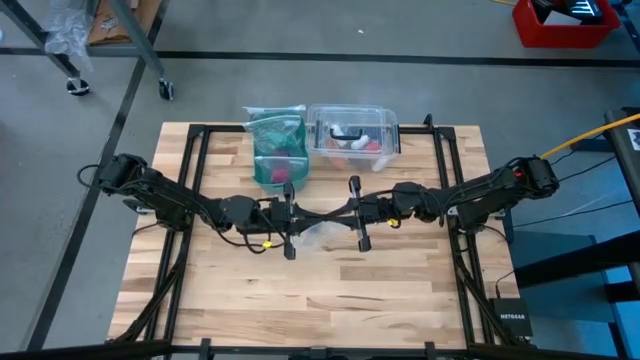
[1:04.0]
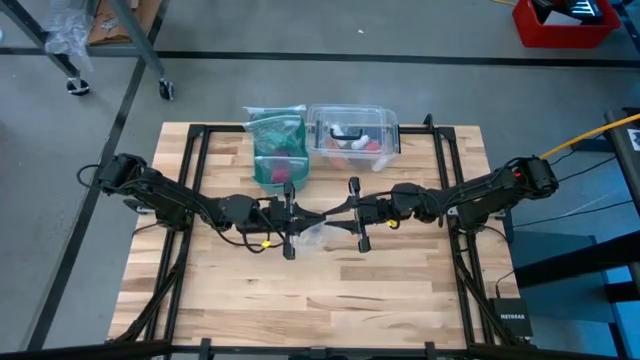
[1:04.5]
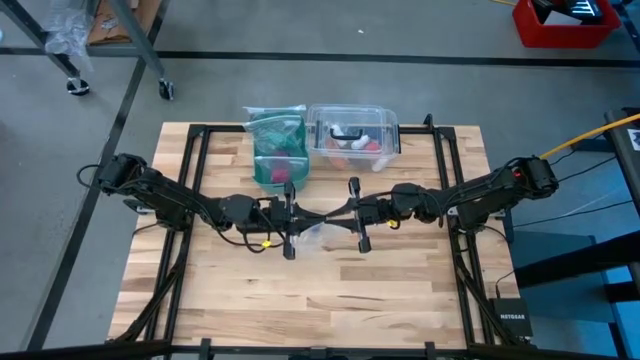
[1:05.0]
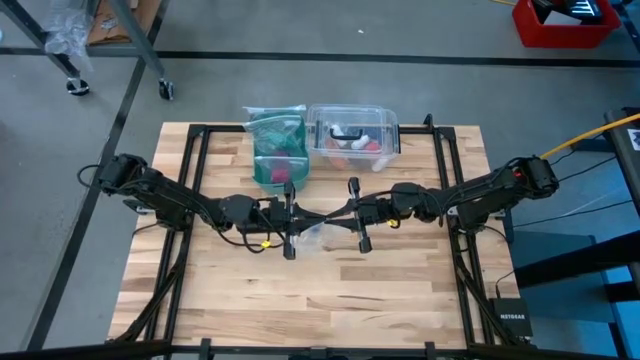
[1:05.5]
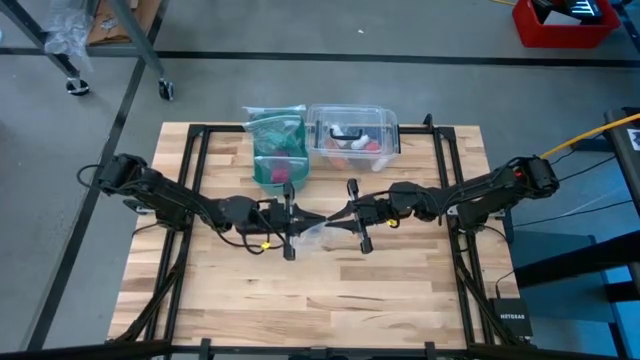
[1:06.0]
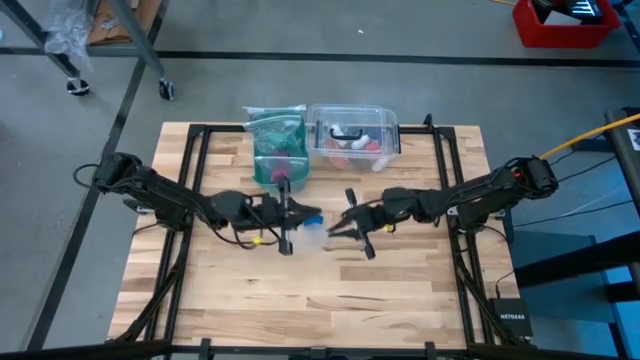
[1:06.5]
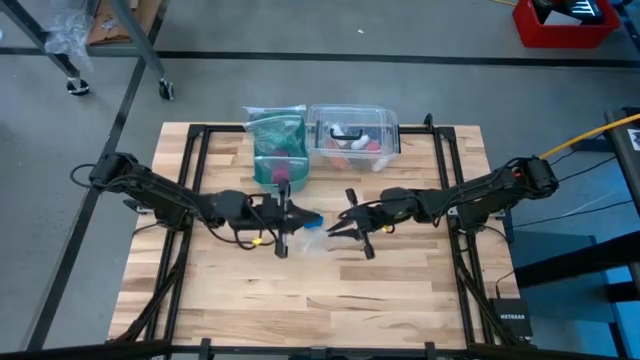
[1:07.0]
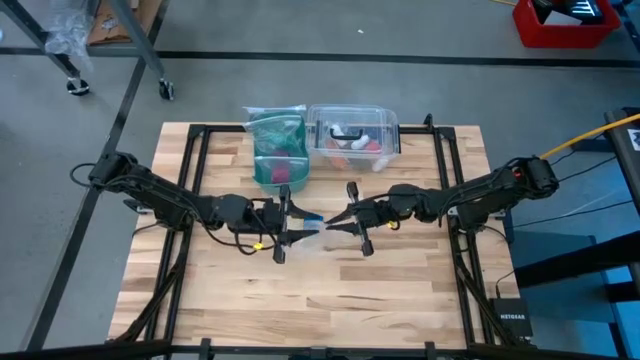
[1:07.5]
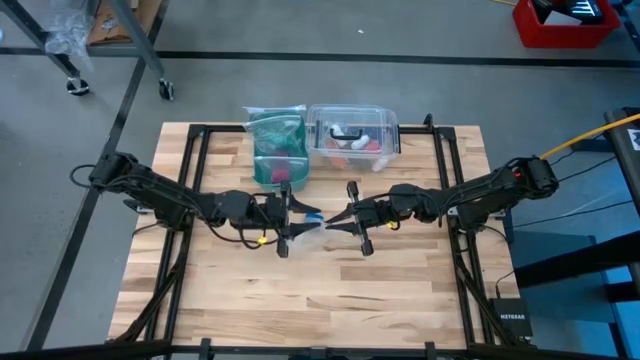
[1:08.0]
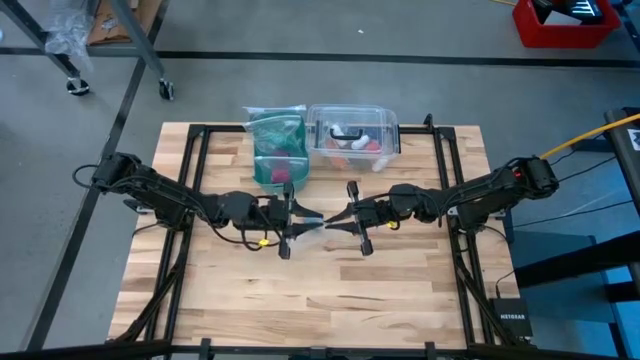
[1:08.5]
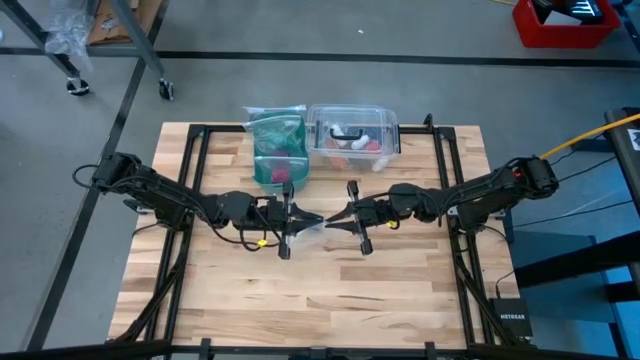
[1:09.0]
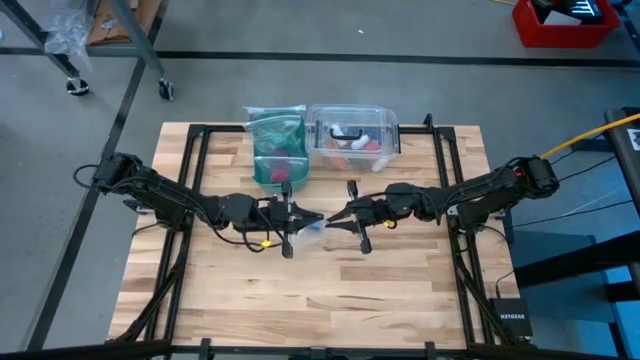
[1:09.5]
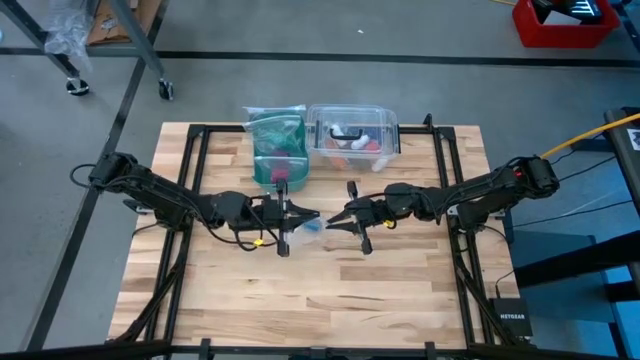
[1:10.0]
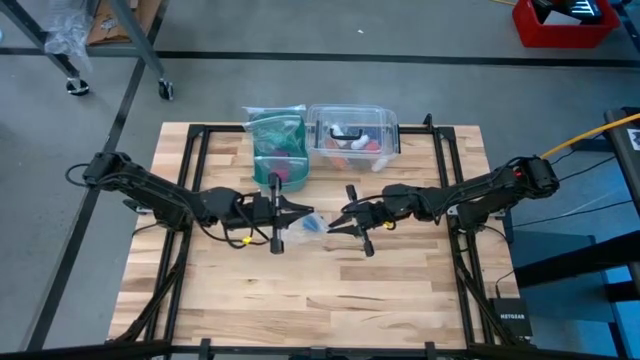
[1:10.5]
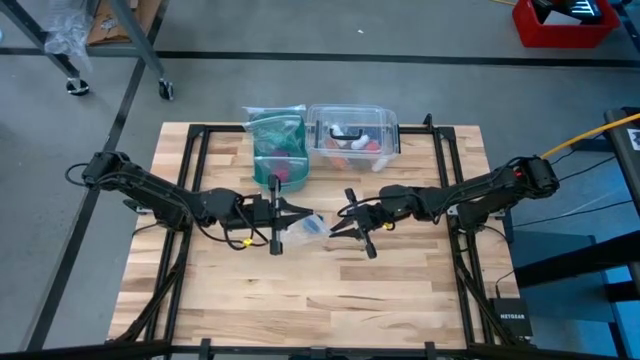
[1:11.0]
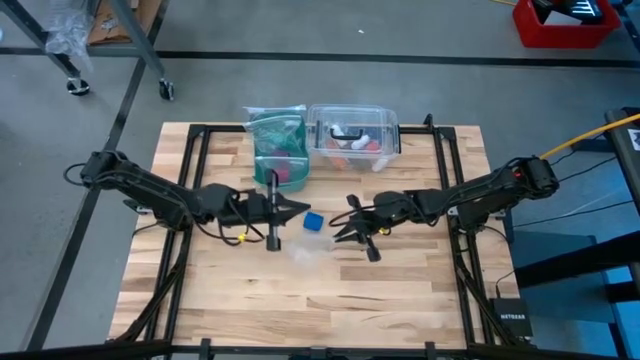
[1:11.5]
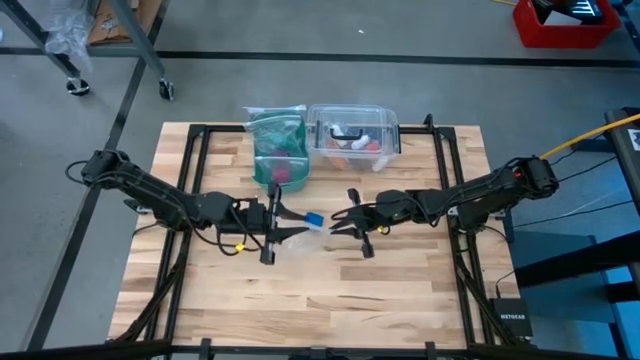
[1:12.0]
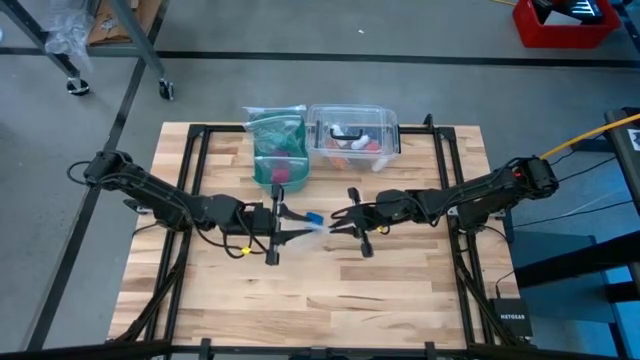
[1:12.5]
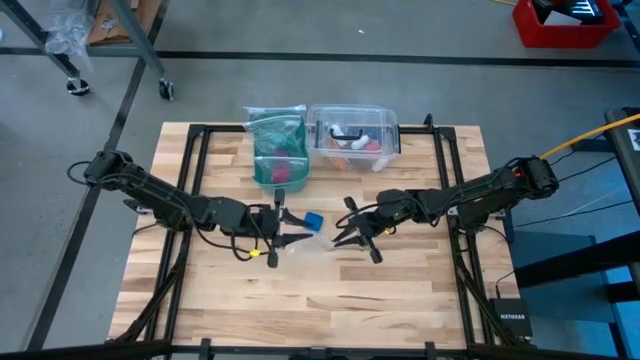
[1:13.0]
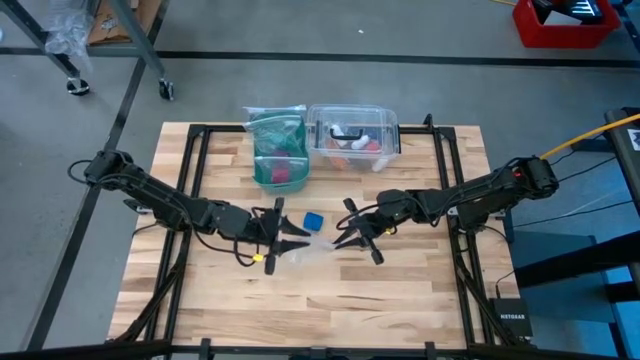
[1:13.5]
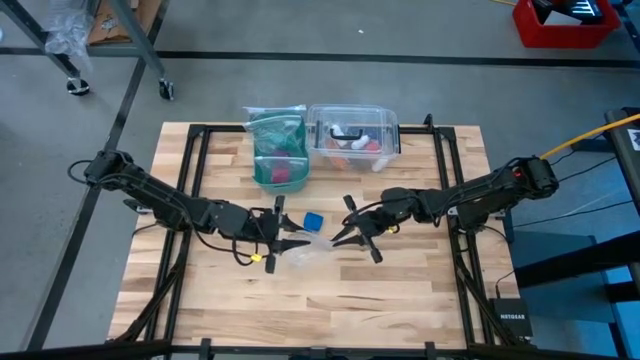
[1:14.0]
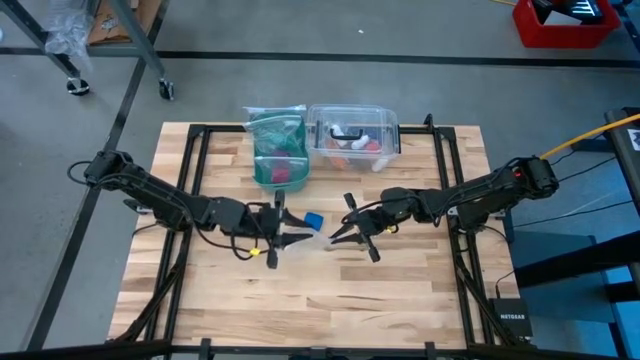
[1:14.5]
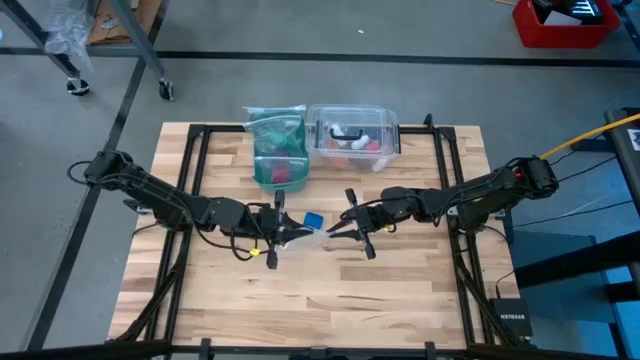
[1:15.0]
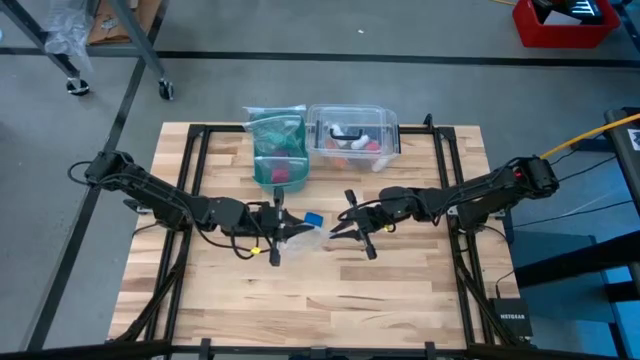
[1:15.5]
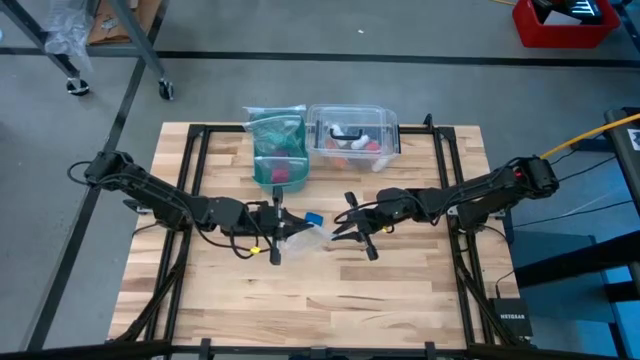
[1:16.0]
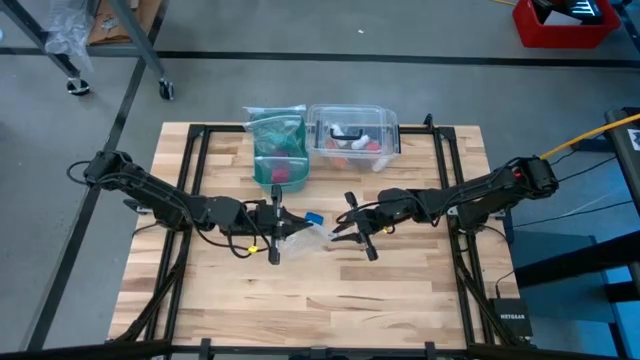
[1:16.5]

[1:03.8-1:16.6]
Task: Roll bandage
Open the transparent zip bag

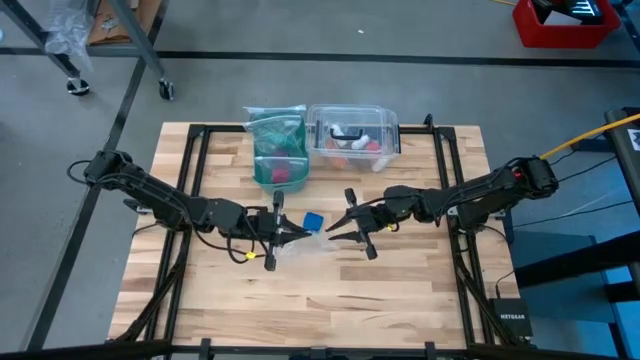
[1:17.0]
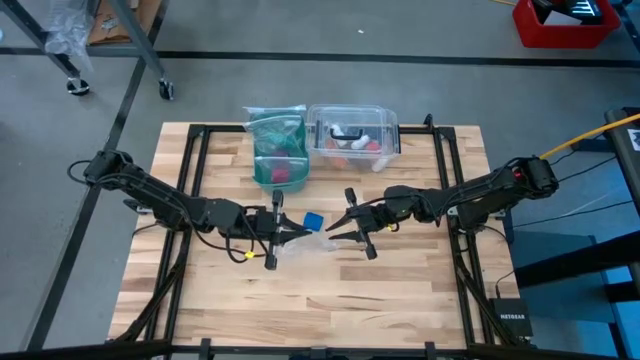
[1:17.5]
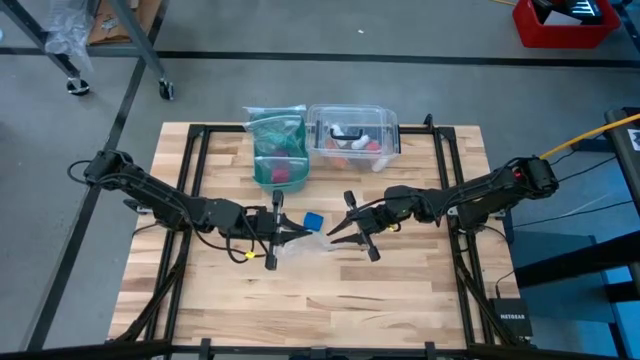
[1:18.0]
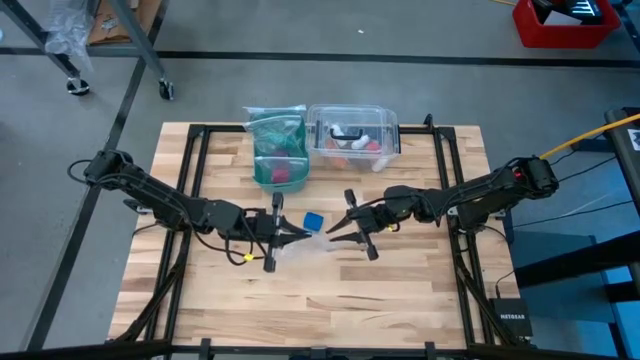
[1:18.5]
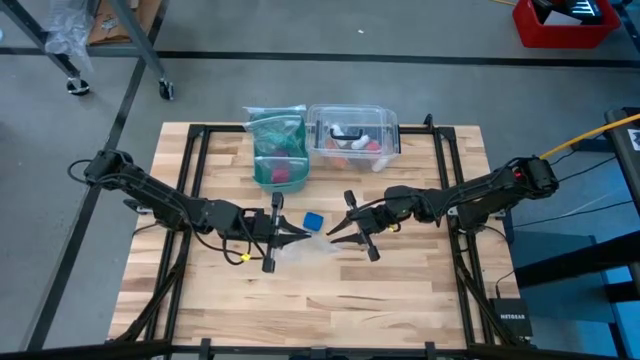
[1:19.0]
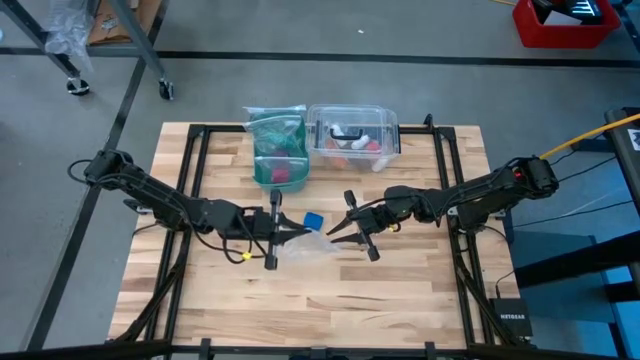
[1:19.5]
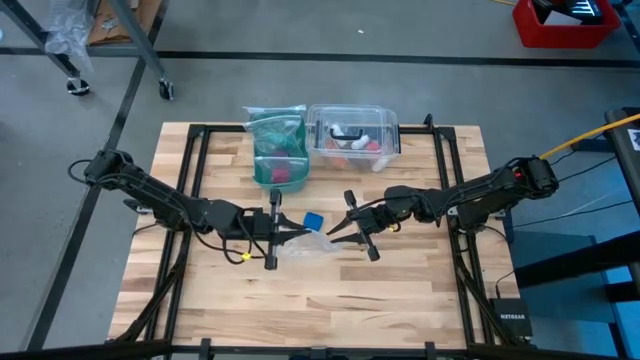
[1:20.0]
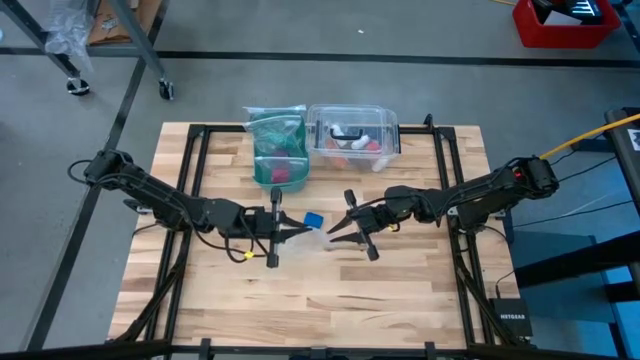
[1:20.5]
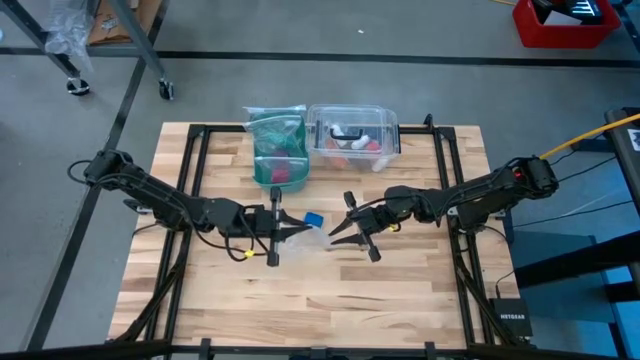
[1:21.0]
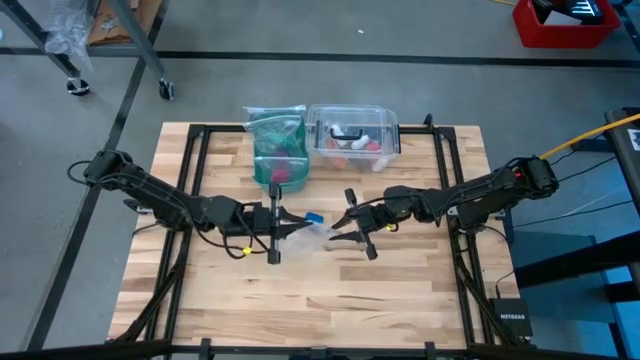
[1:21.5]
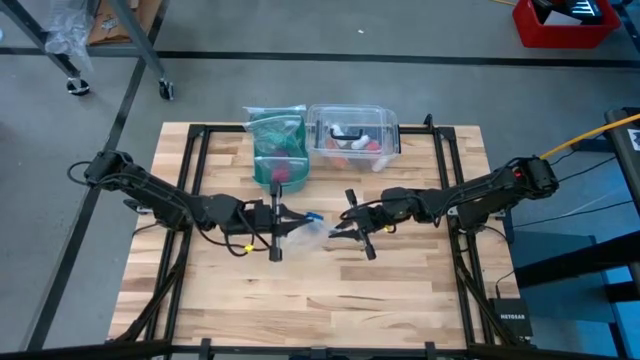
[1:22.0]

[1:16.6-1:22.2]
Open the transparent zip bag

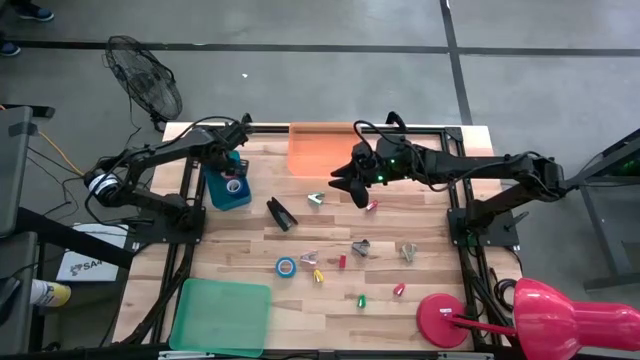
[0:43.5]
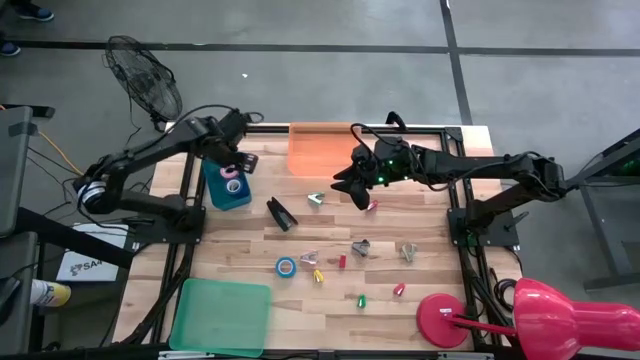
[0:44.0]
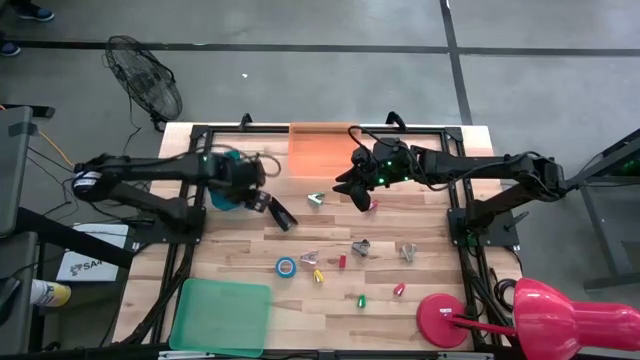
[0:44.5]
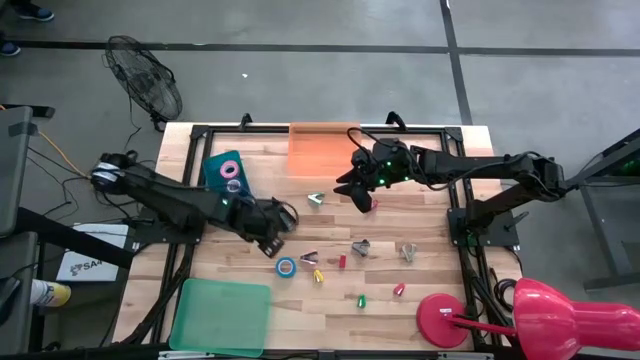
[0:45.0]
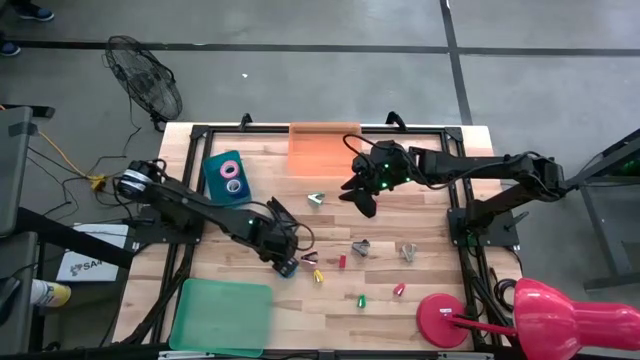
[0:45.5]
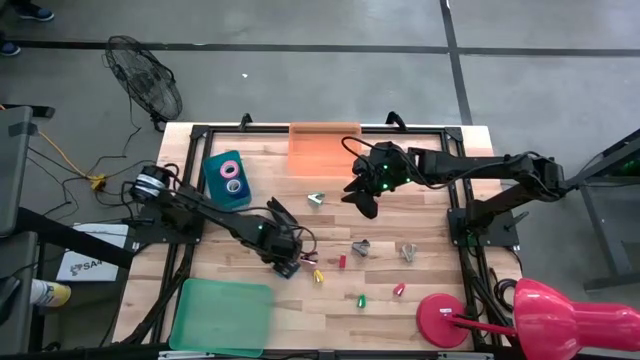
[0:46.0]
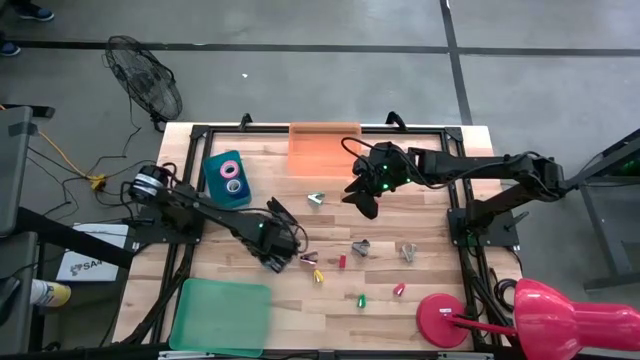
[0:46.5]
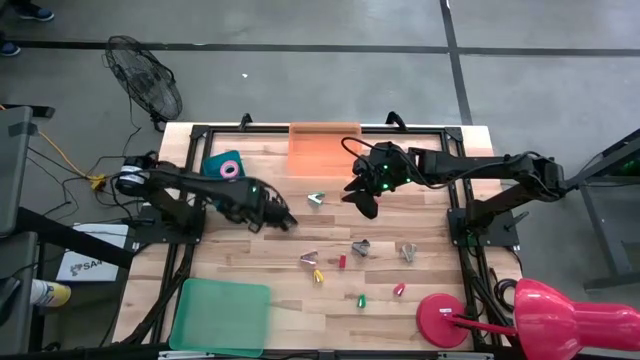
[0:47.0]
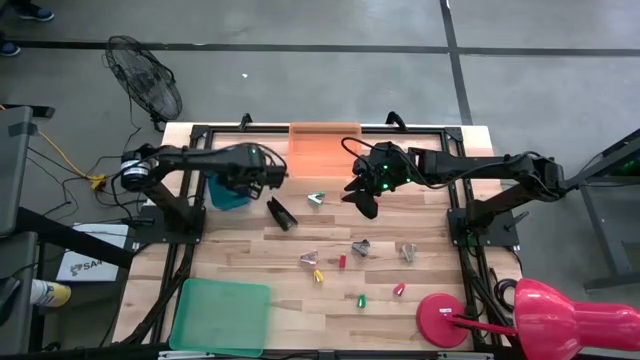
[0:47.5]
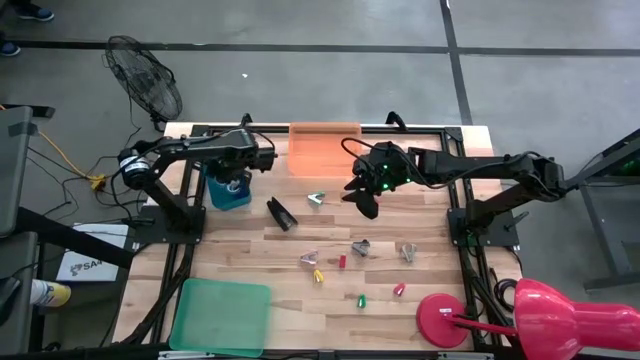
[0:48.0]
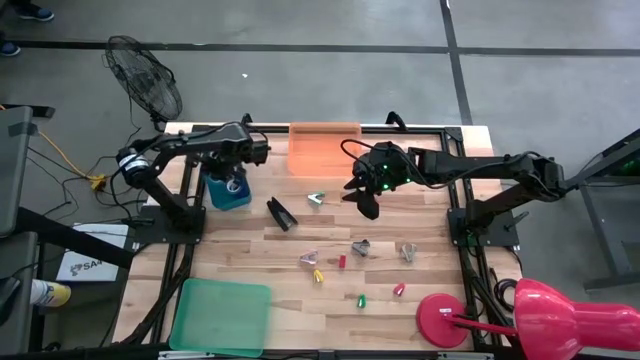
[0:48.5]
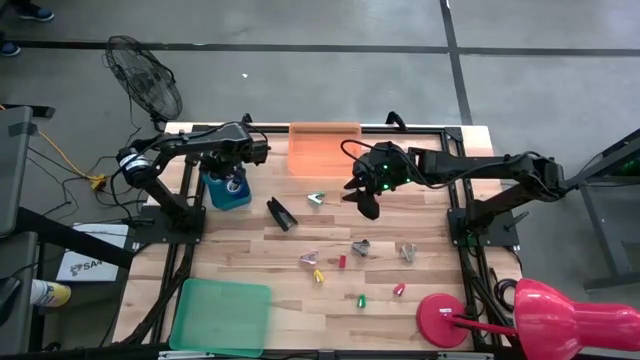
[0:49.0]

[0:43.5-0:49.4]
Task: Pick and place Stapler, Stapler remover, tape
Put the light blue tape into the blue bin
